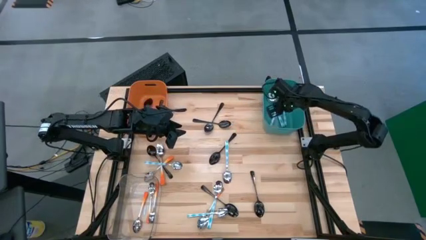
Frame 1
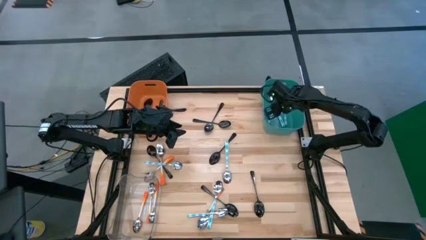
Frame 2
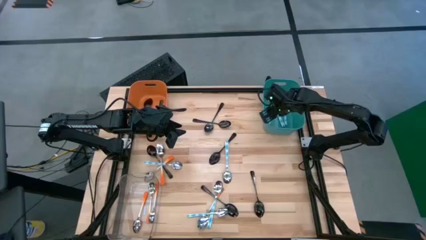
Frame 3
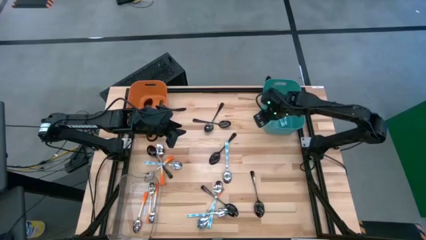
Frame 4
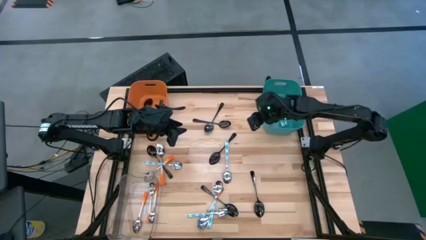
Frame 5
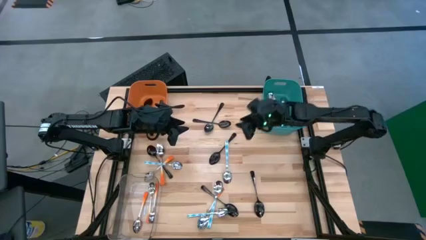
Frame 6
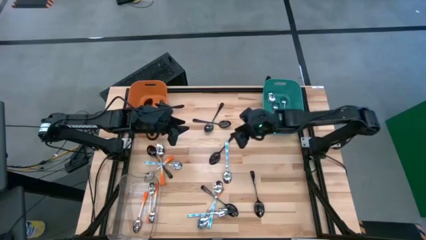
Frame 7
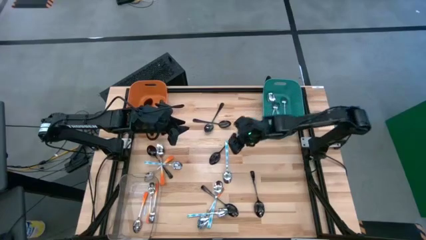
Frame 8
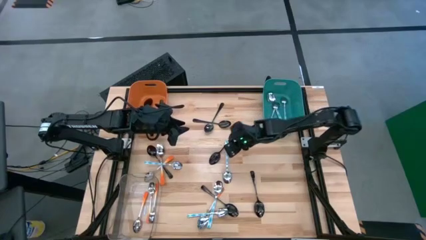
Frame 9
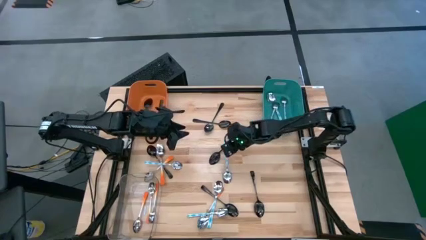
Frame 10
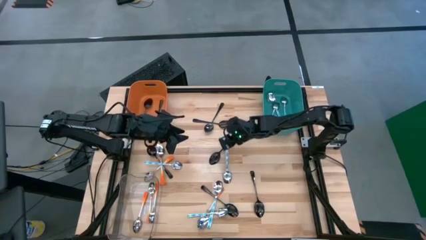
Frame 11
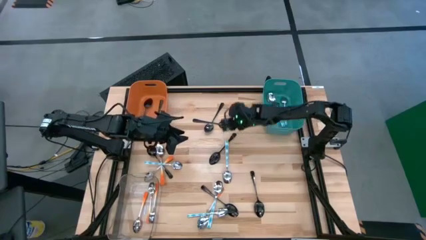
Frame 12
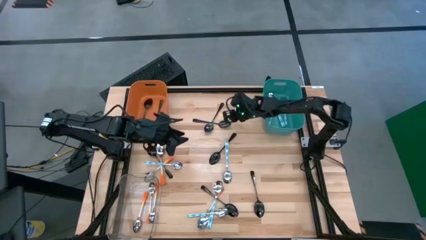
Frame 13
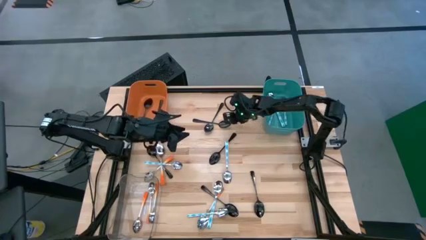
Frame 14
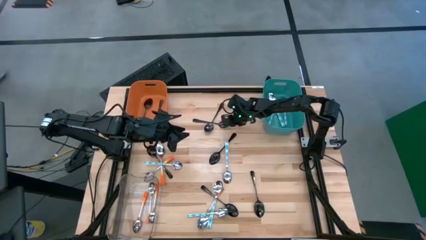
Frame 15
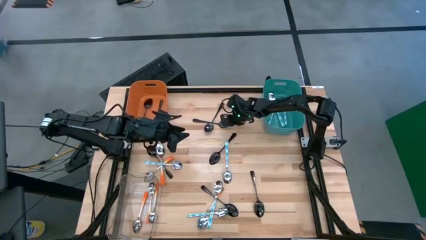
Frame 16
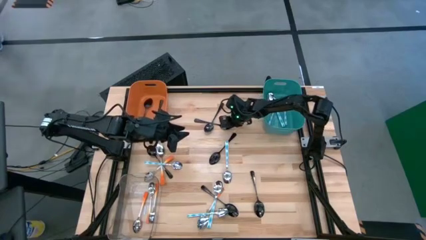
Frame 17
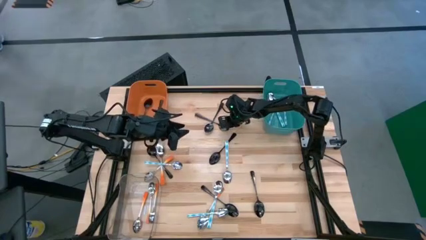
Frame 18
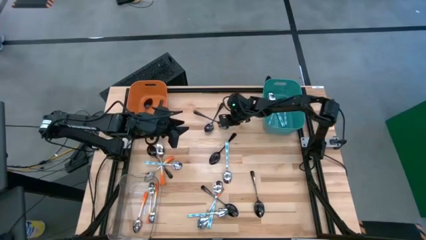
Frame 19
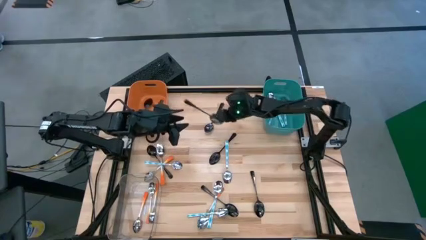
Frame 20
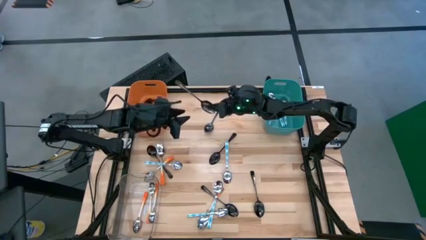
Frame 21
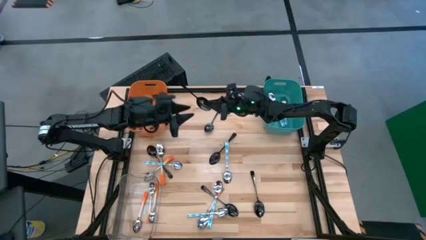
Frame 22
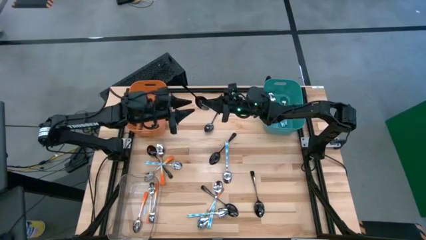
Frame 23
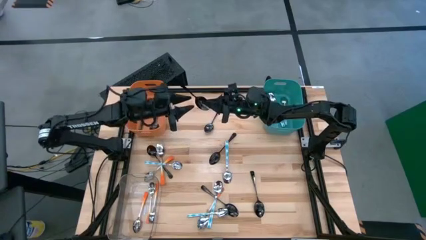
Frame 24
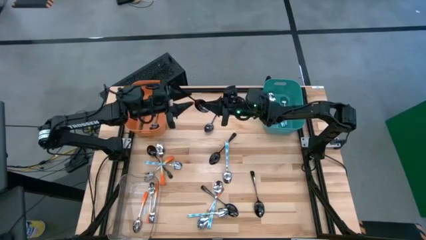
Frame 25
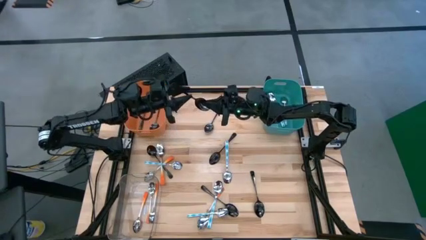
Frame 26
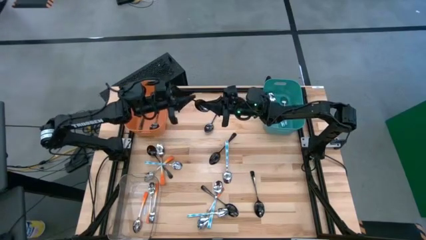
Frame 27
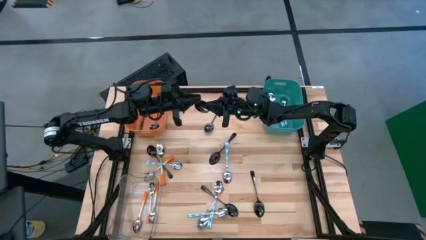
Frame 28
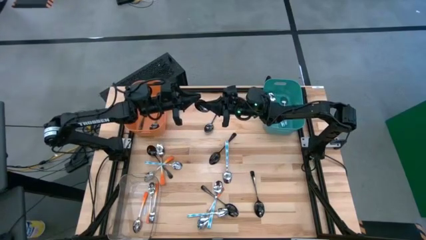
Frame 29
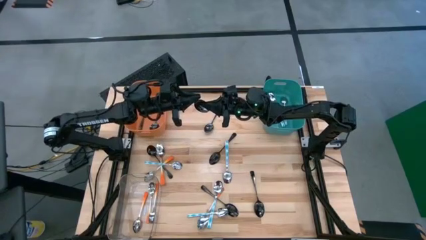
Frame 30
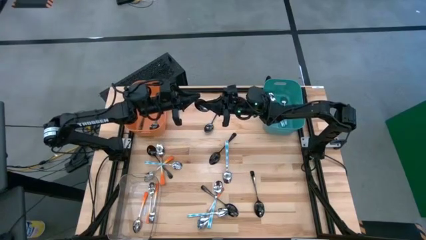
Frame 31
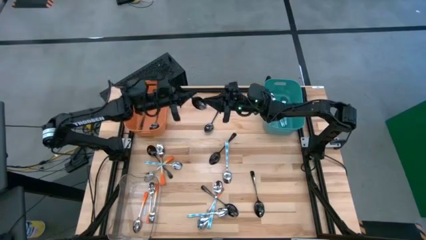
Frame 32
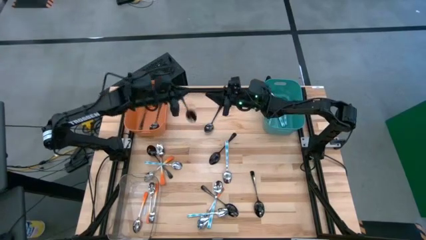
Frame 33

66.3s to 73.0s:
Task: Sort silverware by color (type)
Put the black spoon into the orange bin

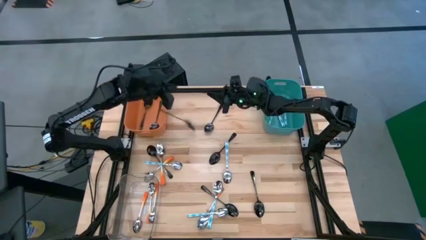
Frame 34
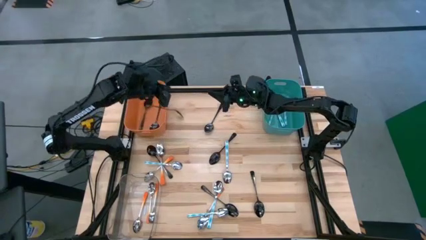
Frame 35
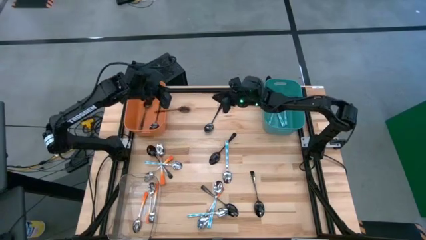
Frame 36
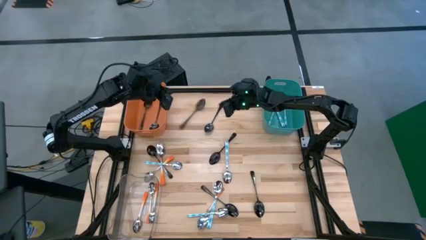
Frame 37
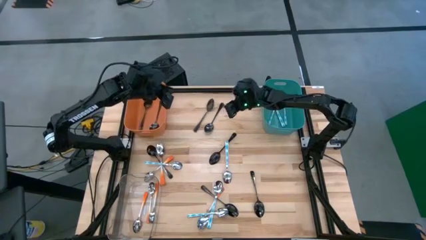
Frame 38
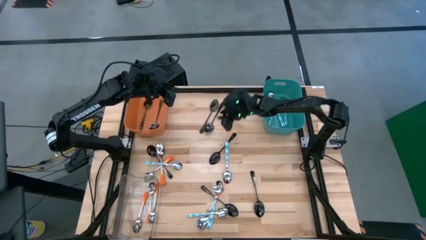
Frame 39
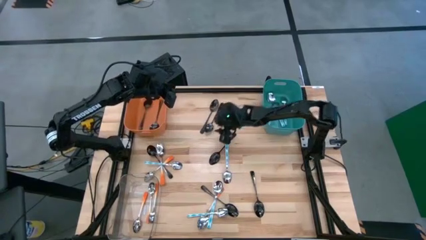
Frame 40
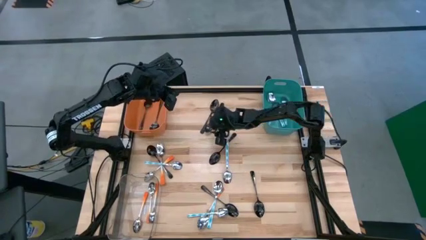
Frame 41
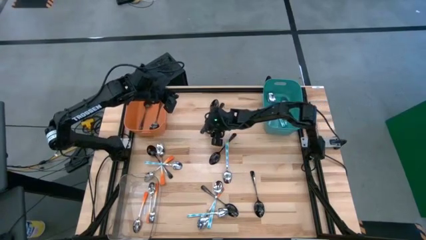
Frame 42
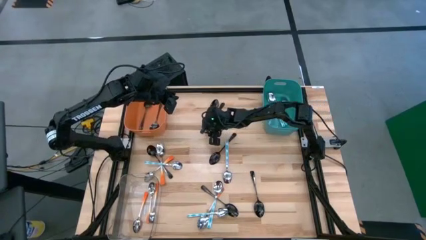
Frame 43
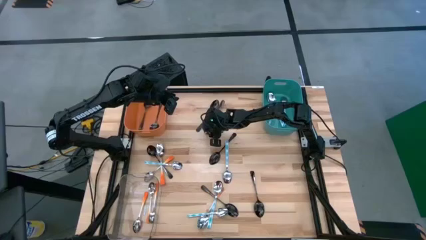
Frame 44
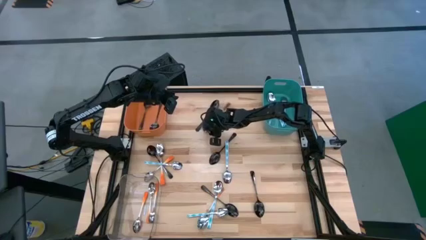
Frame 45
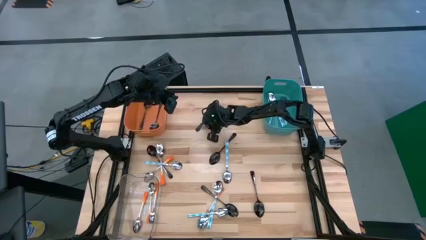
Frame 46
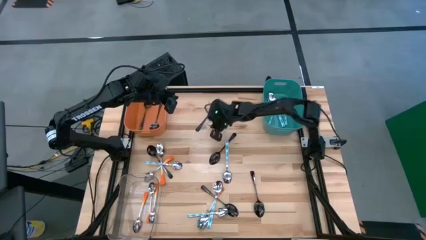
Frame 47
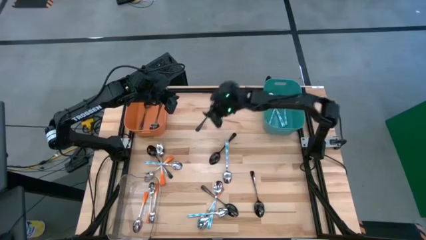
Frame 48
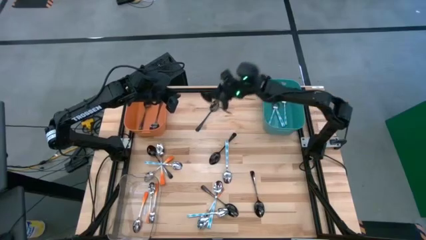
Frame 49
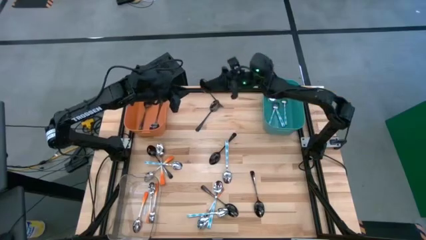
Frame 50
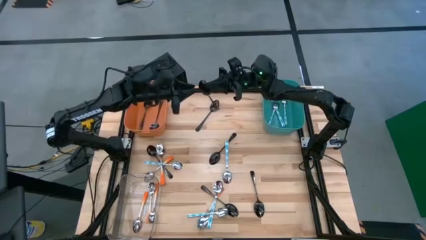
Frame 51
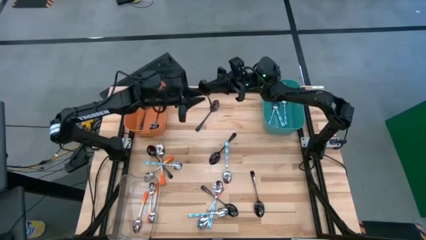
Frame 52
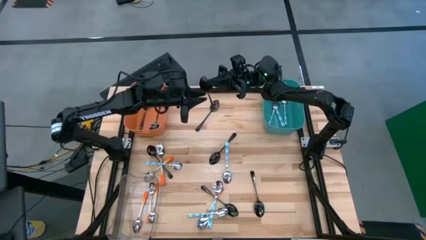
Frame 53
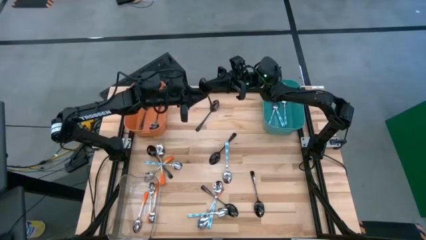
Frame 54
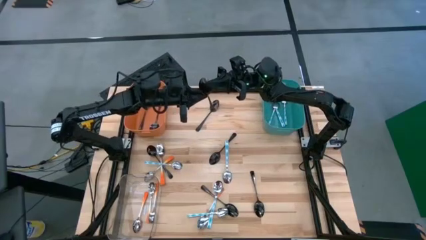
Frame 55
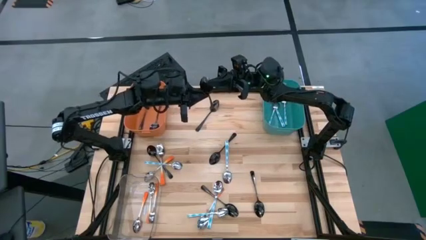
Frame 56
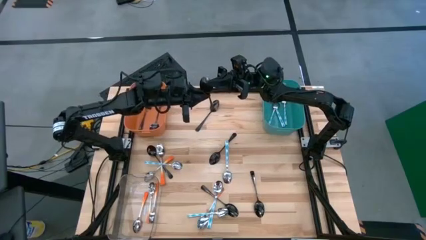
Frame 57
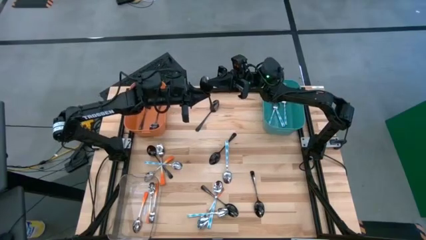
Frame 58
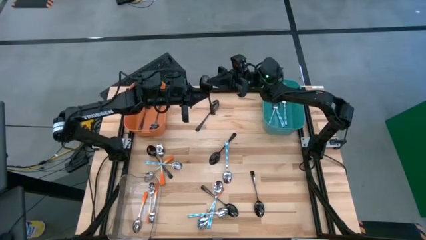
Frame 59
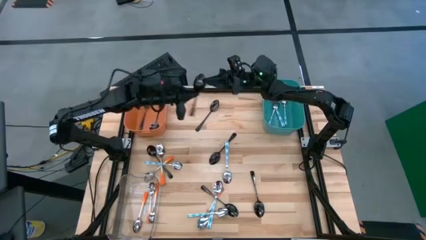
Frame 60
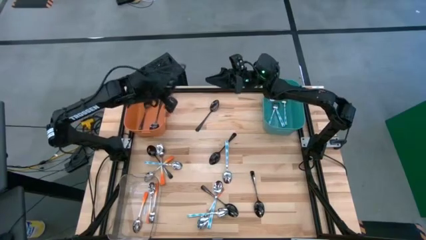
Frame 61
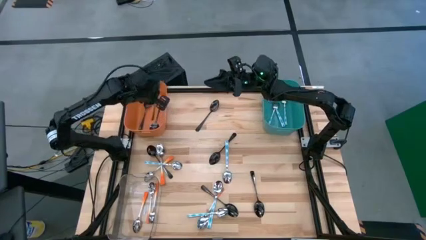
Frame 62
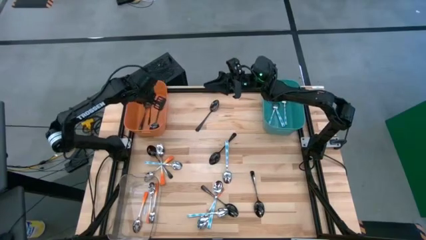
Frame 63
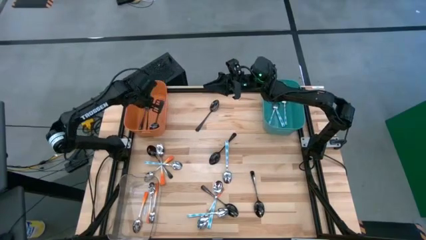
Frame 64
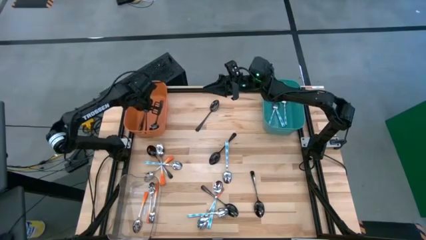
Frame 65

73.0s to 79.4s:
Put the black spoon into the orange bin

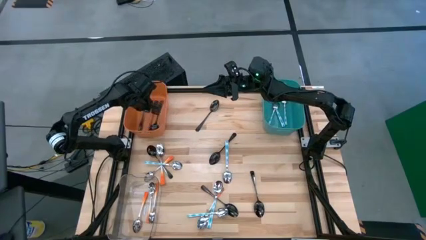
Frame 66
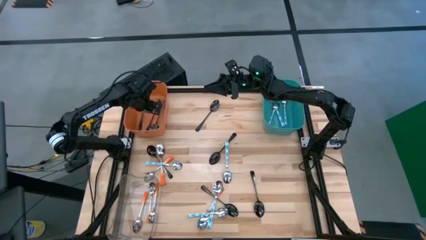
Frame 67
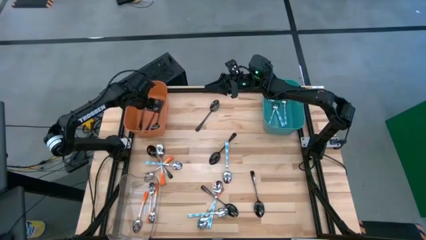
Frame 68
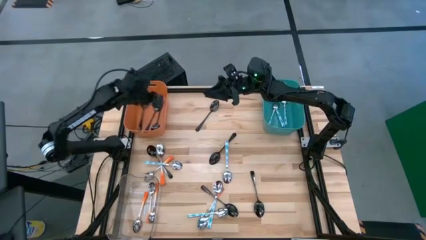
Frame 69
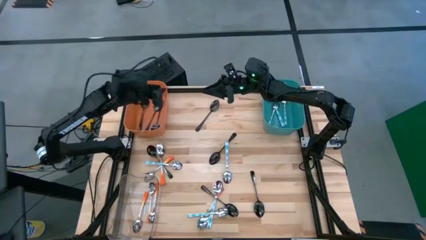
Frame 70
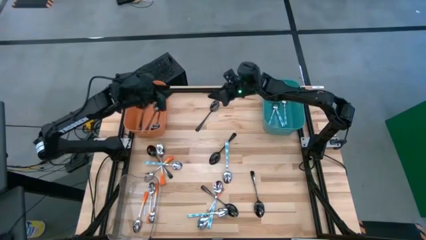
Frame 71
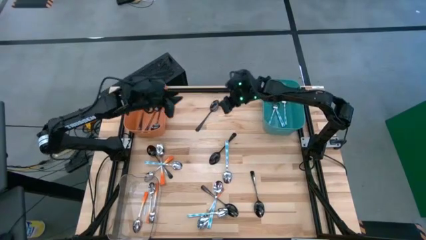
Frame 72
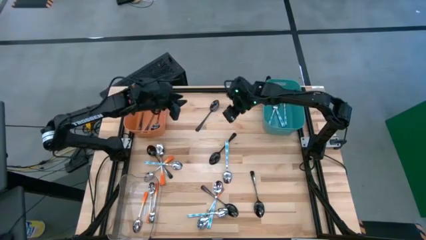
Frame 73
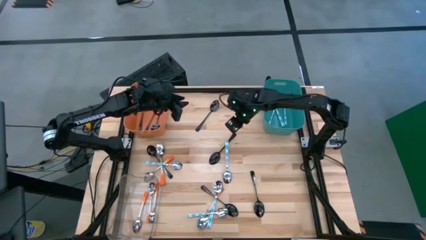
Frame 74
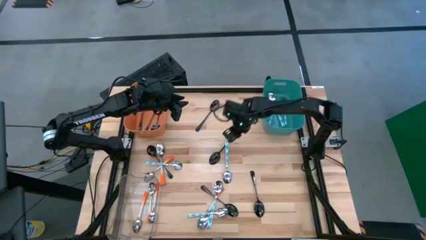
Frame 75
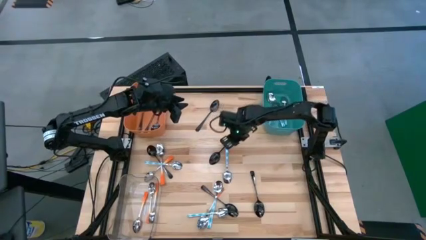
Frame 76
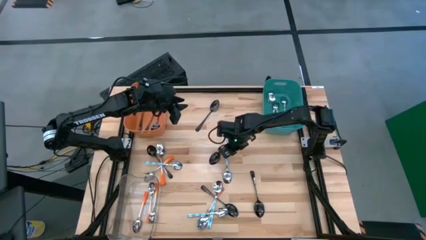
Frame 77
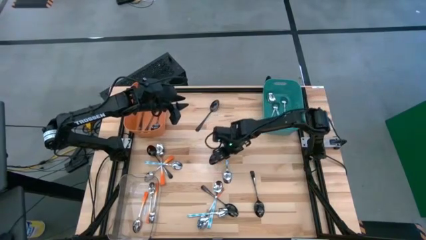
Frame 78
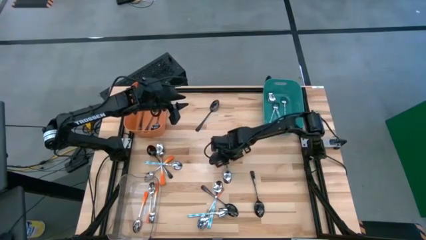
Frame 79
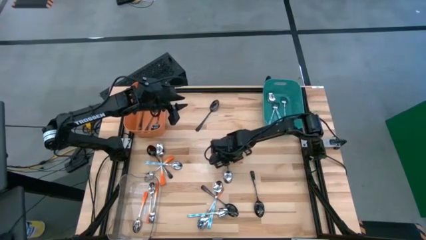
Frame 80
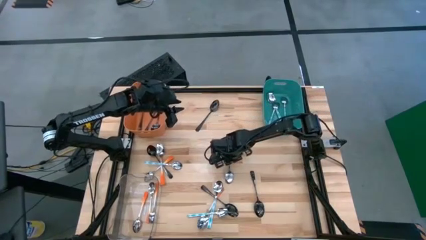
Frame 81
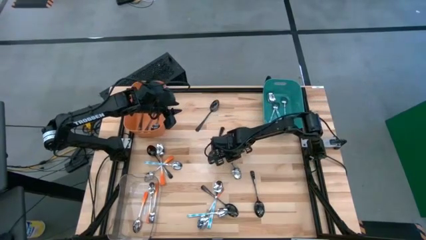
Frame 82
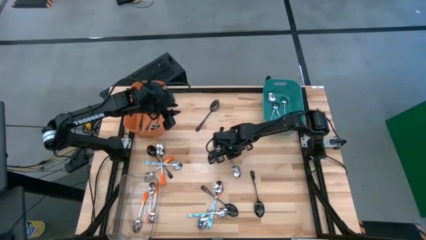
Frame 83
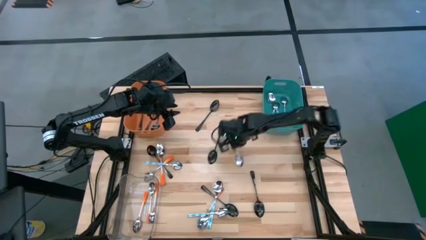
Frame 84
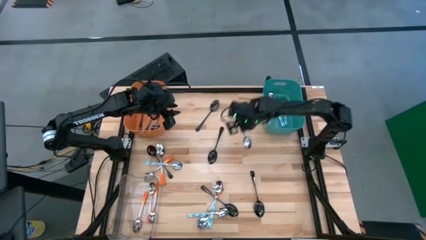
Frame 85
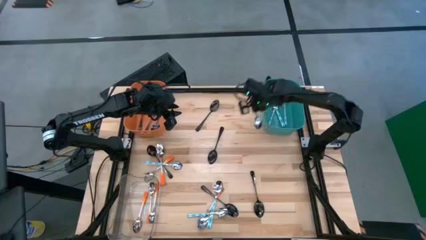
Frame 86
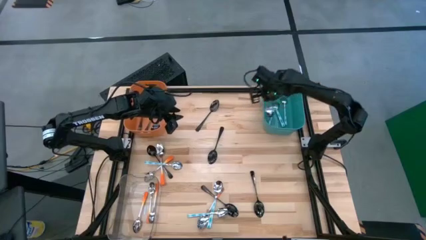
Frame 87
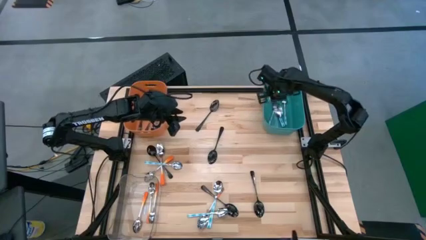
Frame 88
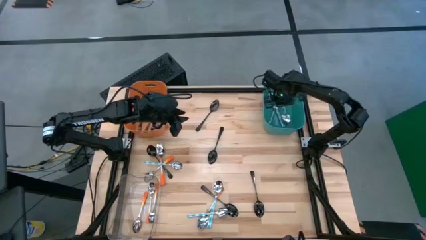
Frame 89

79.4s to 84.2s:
Put the blue patterned spoon into the blue bin
